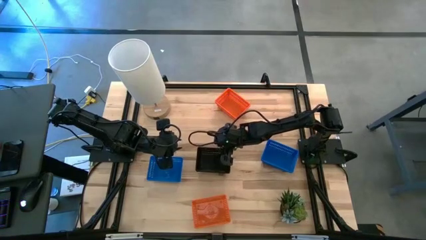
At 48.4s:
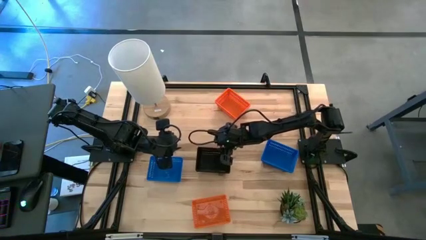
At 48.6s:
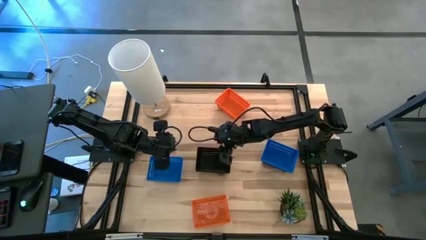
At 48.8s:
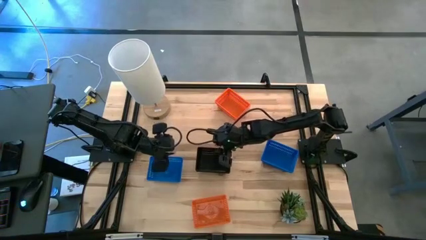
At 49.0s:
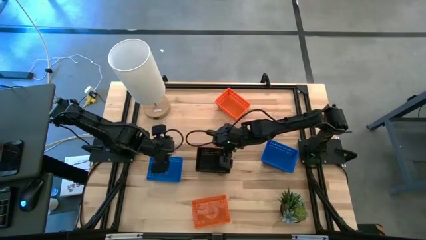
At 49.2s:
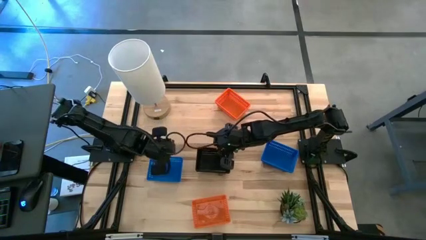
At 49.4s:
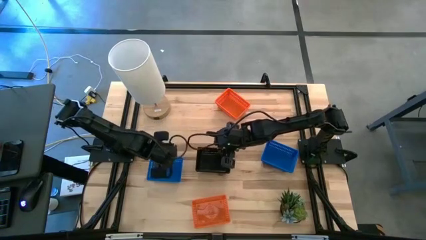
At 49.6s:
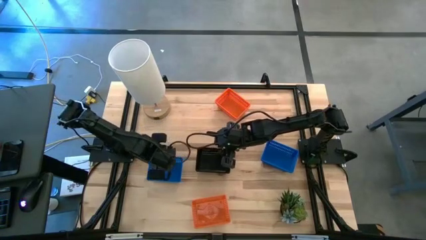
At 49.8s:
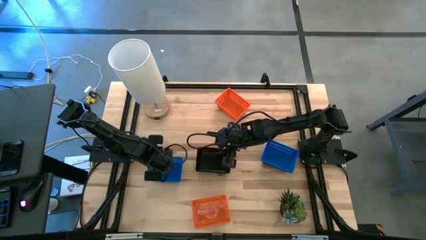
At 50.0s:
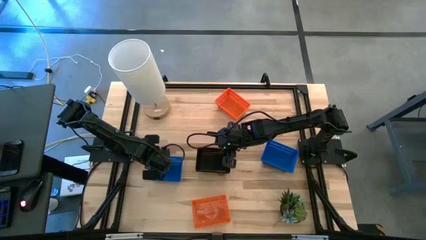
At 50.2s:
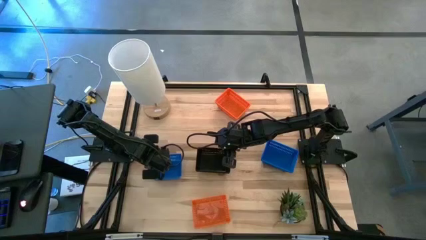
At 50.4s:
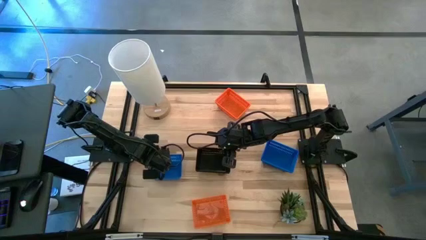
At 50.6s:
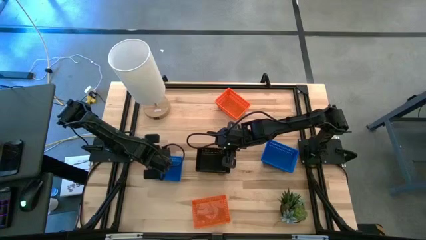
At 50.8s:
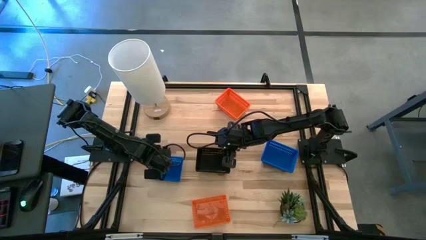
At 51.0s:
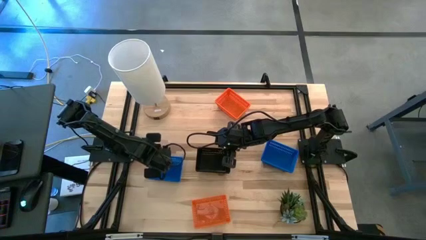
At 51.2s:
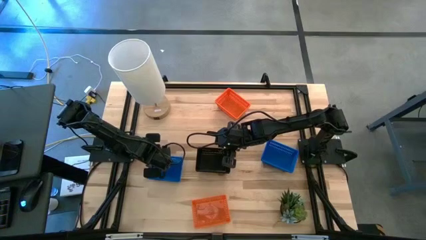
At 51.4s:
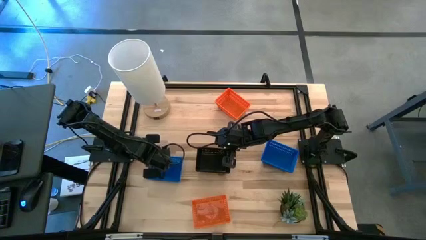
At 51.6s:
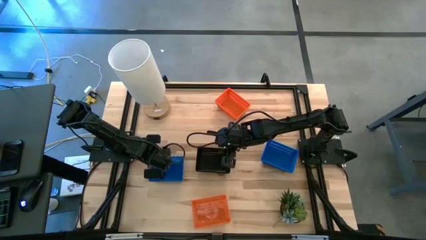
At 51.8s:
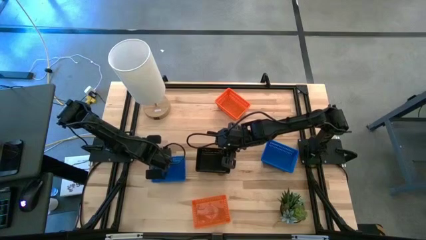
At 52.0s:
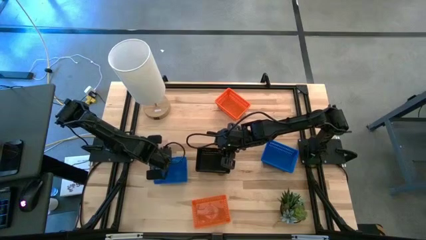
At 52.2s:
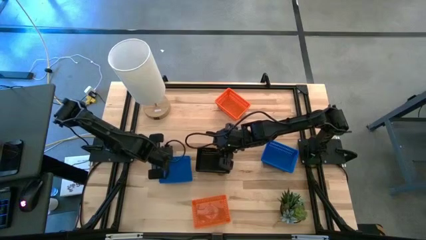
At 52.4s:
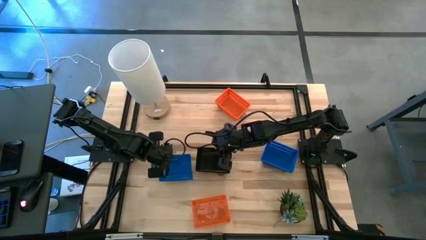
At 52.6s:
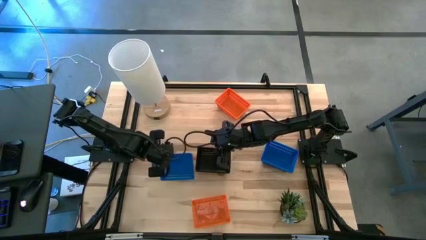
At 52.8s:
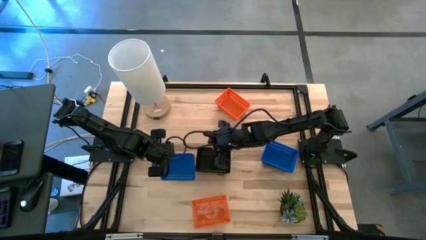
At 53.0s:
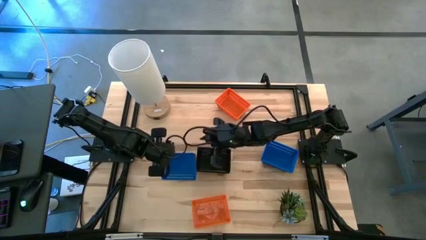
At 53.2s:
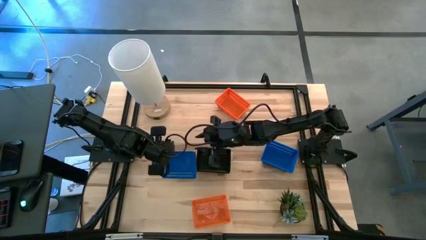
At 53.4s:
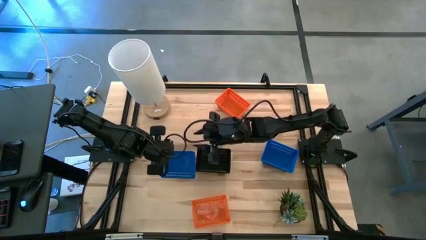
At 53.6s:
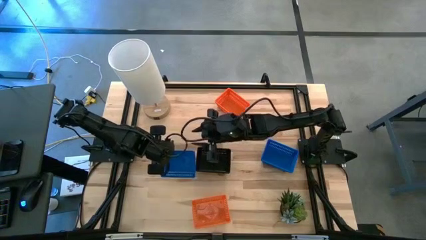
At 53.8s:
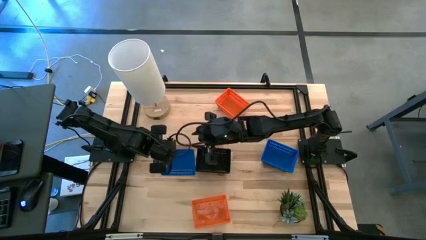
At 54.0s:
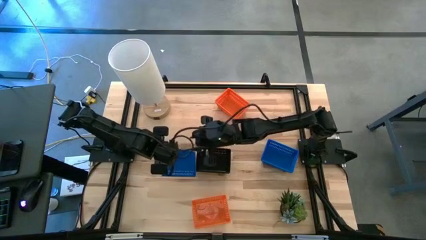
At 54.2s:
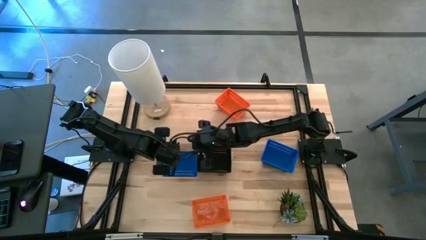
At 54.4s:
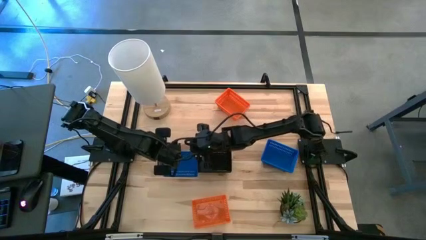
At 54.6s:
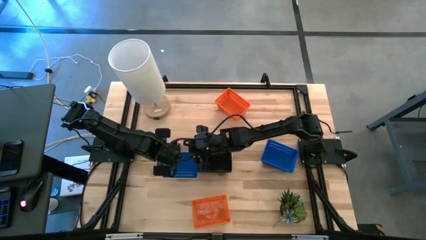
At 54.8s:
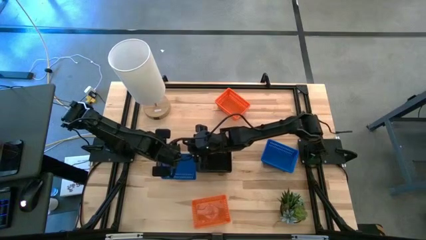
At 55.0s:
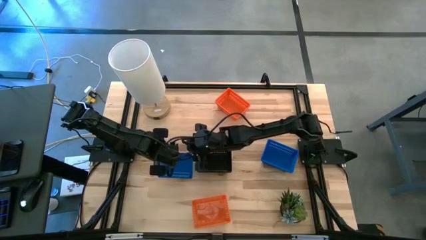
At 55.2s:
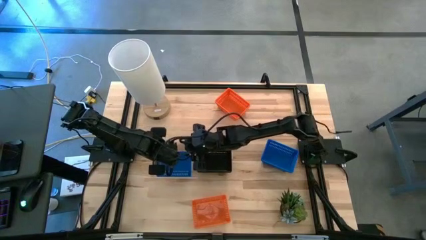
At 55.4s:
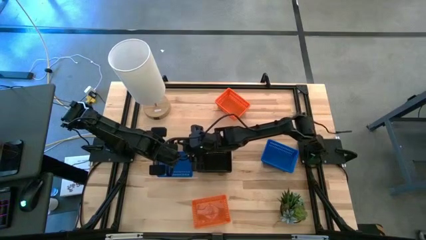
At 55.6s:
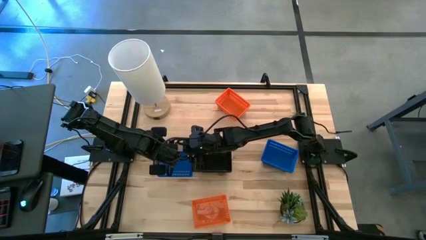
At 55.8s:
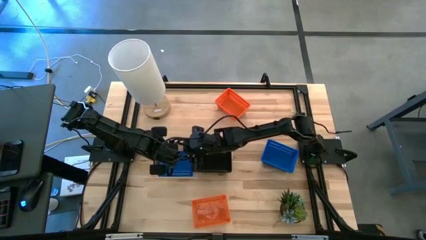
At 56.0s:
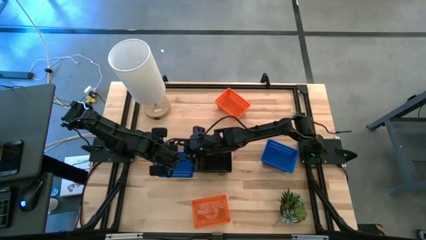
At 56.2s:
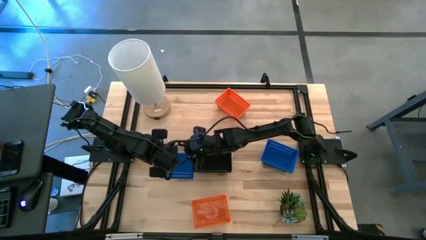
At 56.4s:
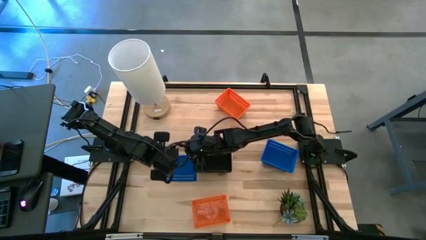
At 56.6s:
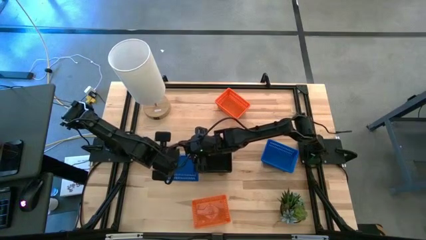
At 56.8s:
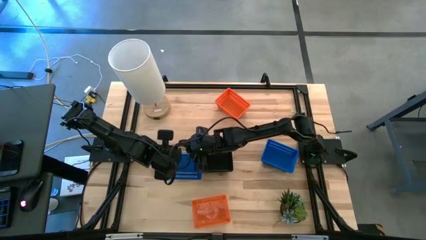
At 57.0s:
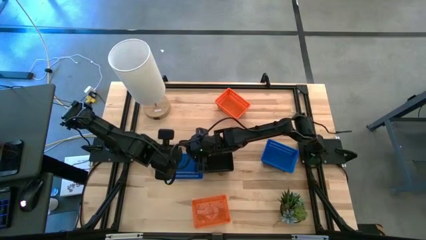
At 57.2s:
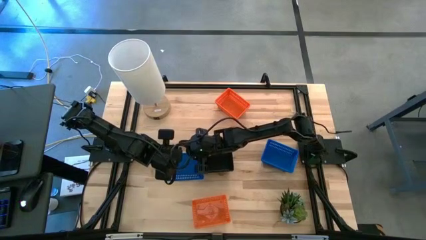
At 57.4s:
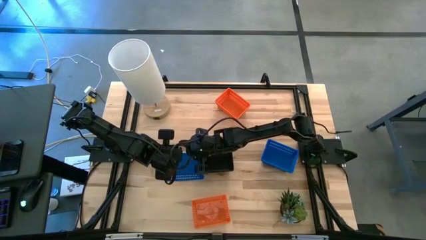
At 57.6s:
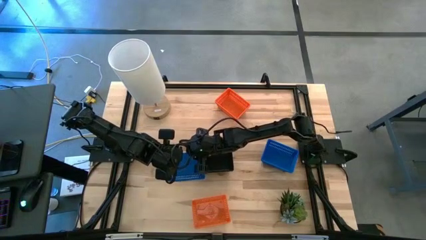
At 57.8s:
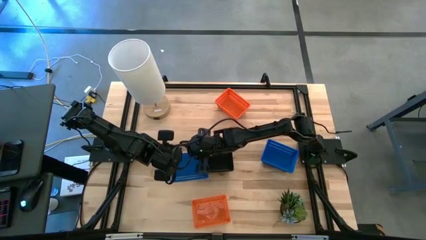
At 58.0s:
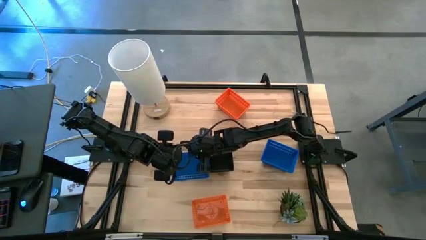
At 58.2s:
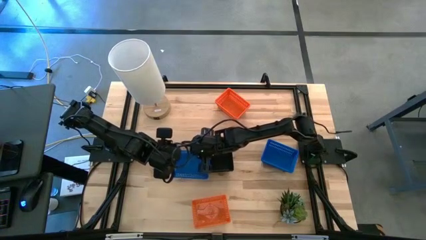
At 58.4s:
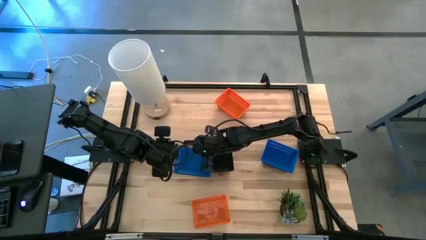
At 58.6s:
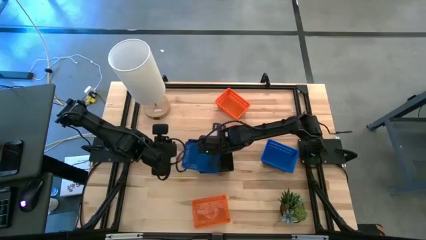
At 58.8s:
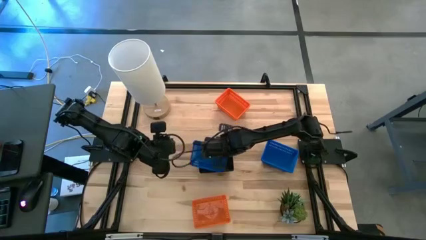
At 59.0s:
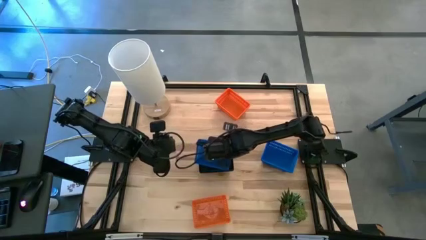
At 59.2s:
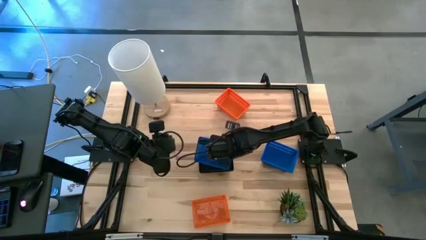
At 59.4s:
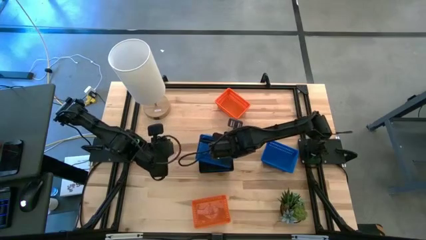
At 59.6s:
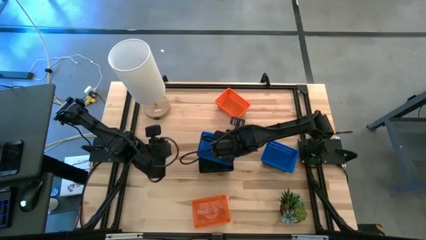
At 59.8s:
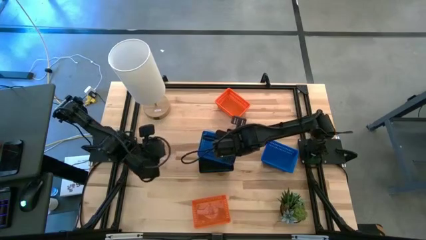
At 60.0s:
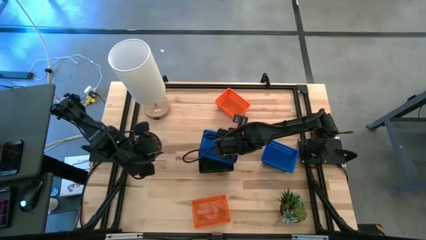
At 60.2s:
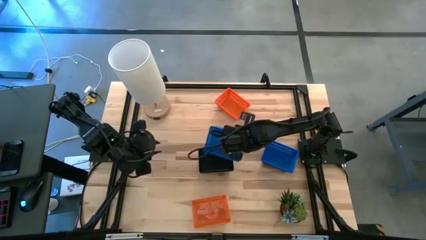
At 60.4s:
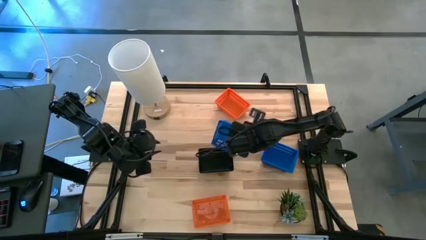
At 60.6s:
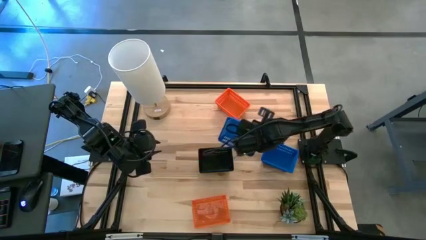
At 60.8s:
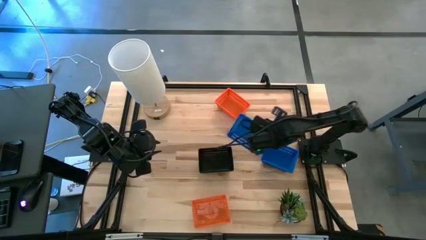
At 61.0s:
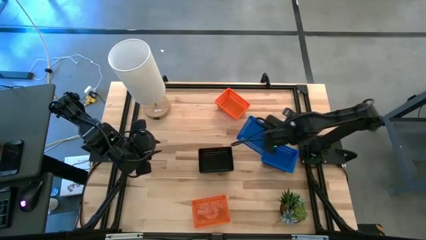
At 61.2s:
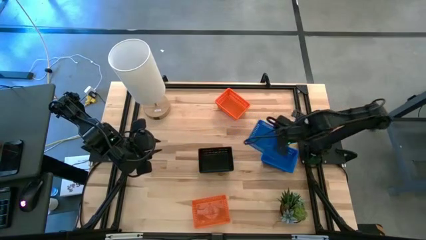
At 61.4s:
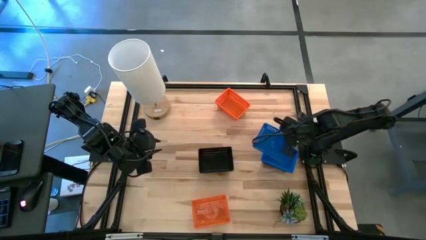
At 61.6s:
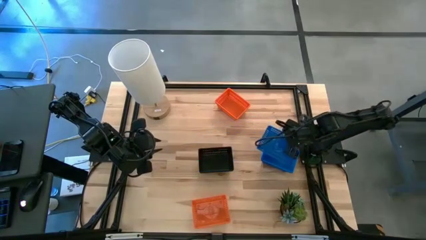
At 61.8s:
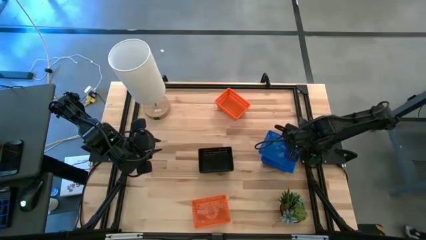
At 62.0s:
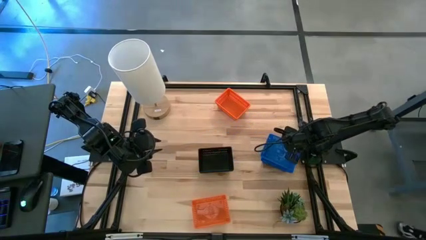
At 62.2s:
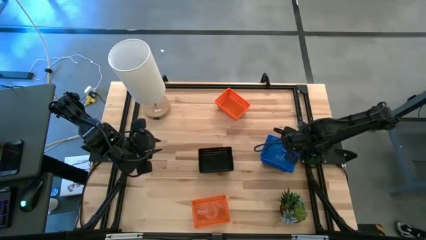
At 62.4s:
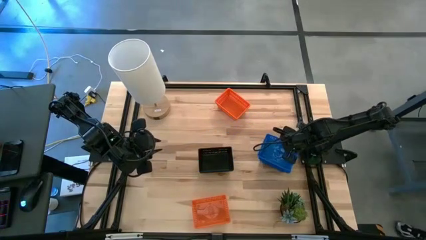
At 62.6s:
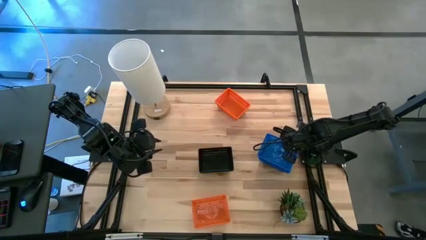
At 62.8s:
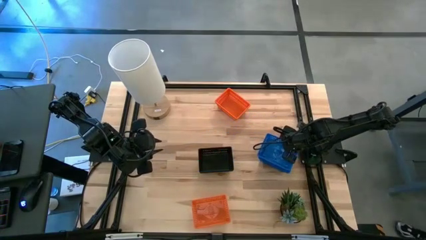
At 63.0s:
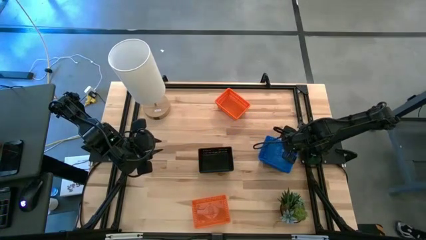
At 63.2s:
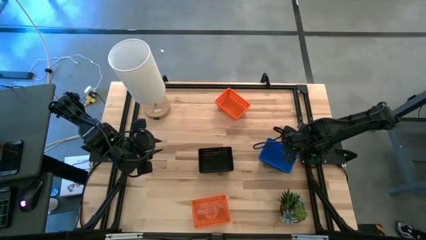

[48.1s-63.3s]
Stack the left blue bin on the right blue bin

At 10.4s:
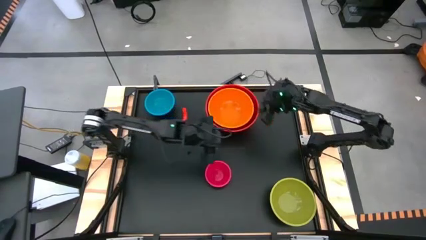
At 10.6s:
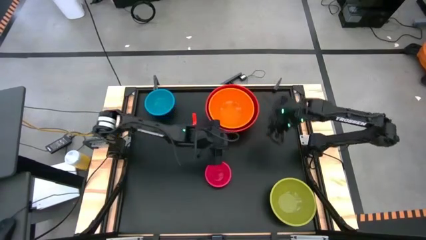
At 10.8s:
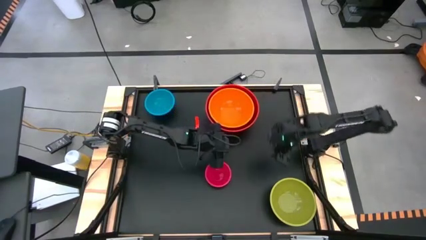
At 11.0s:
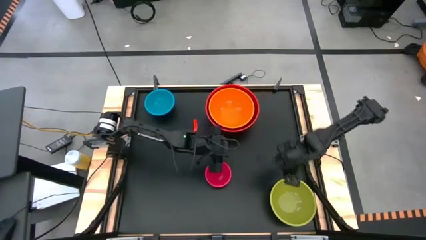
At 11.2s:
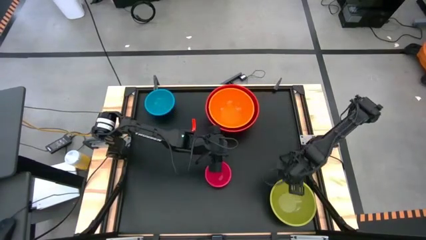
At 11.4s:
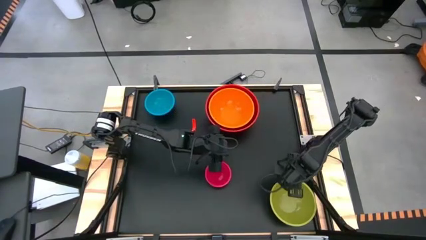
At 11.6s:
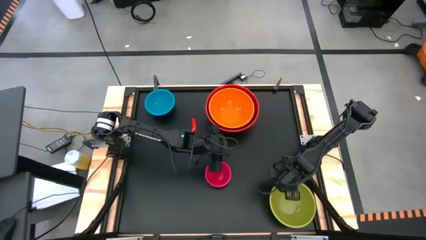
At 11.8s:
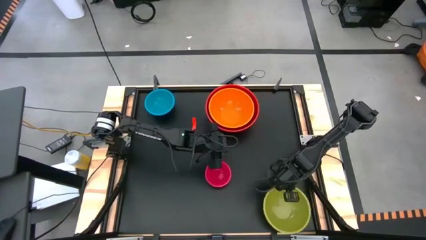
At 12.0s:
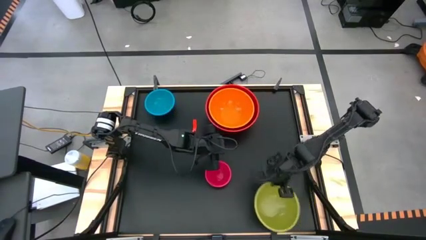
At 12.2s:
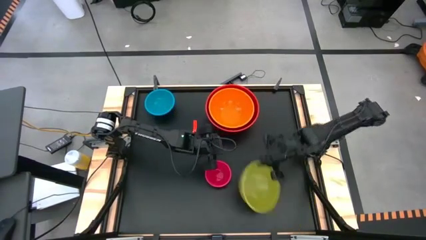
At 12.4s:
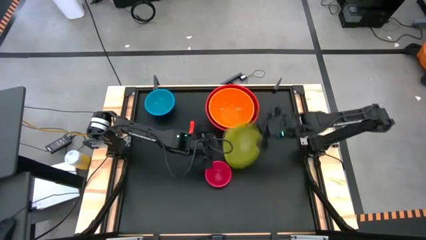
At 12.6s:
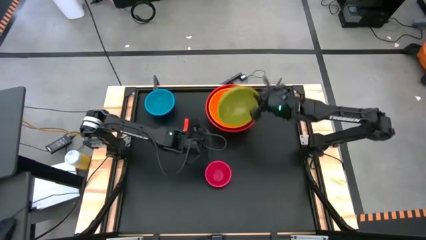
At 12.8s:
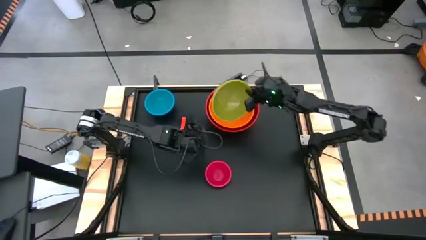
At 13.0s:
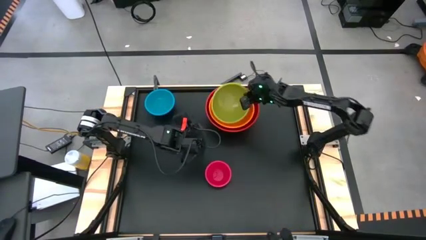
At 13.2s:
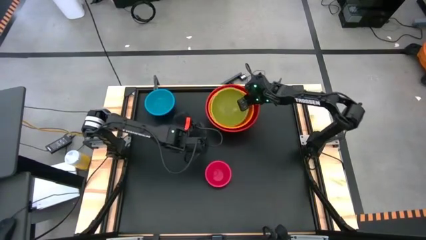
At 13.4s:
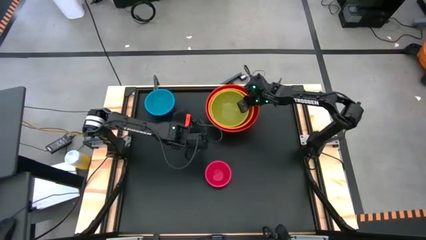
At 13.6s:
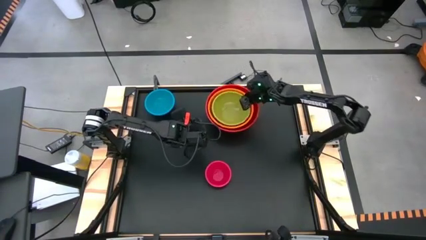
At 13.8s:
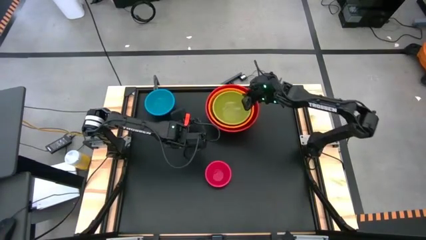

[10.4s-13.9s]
Stack the green bowl on the orange bowl
